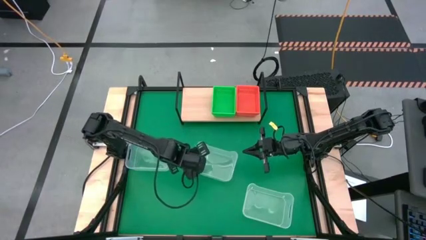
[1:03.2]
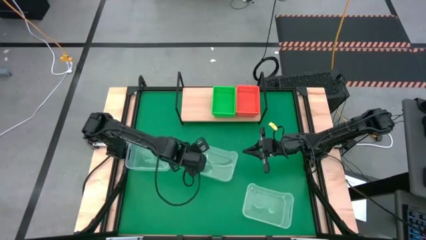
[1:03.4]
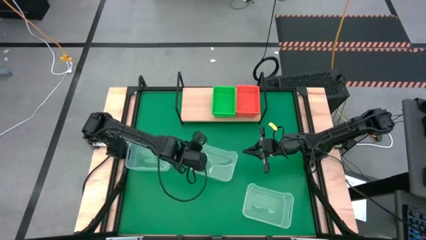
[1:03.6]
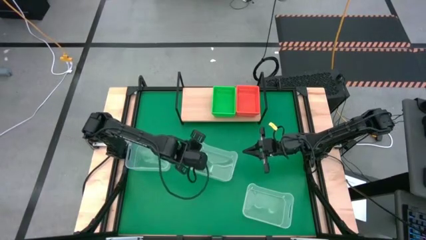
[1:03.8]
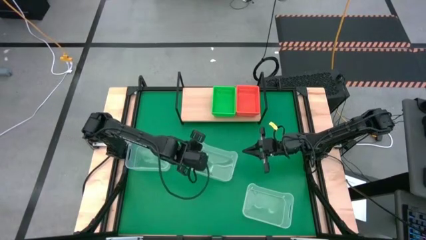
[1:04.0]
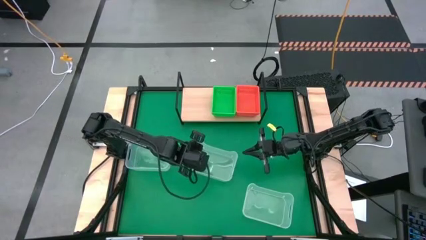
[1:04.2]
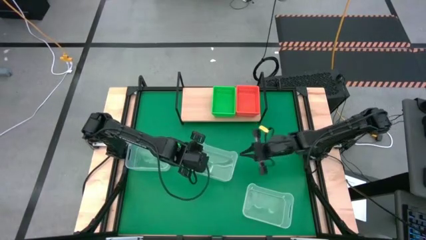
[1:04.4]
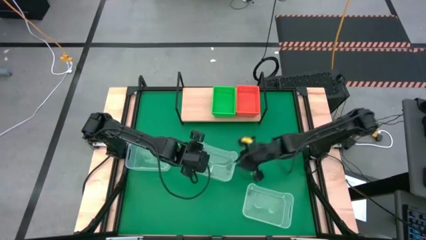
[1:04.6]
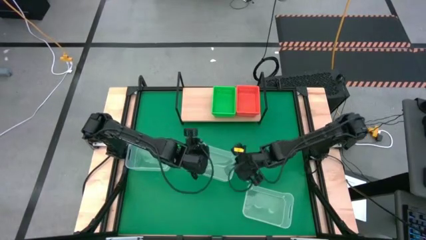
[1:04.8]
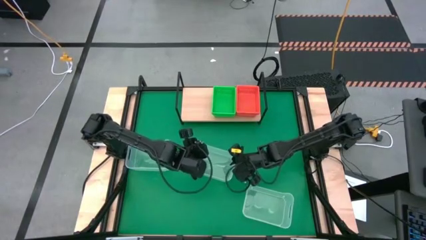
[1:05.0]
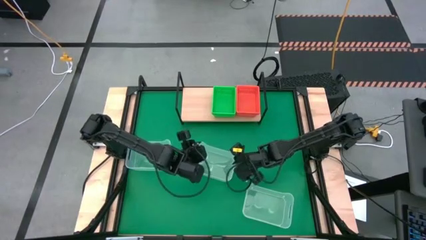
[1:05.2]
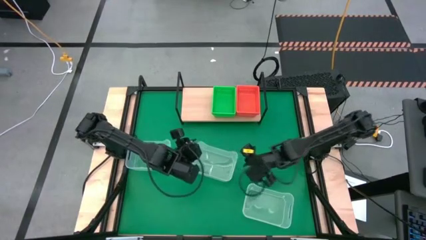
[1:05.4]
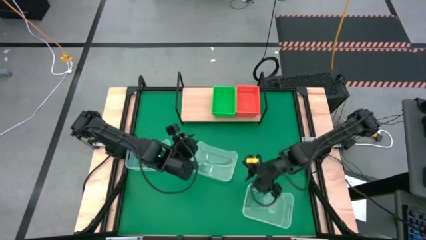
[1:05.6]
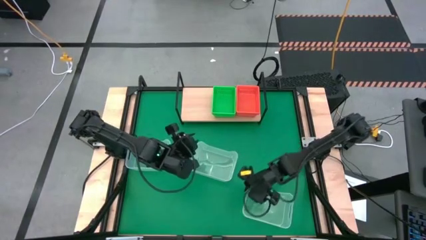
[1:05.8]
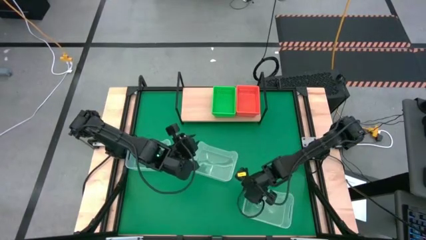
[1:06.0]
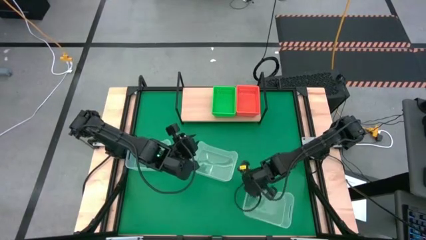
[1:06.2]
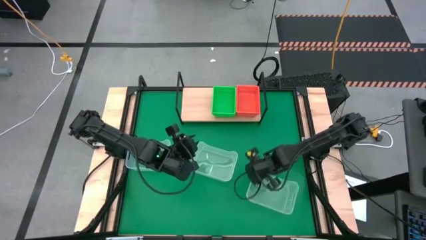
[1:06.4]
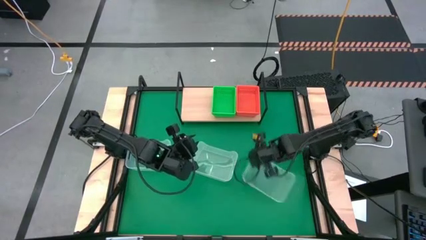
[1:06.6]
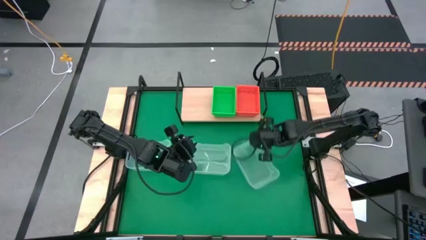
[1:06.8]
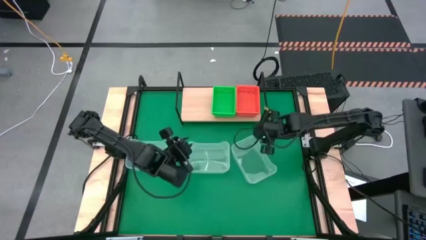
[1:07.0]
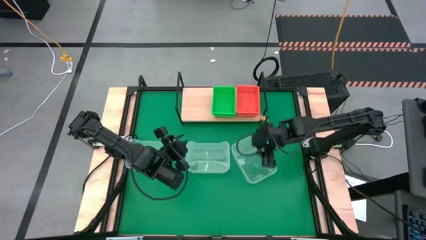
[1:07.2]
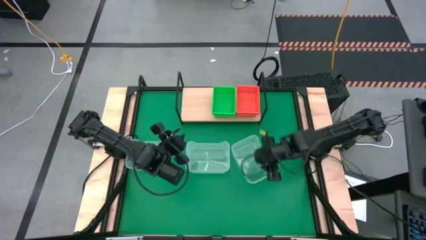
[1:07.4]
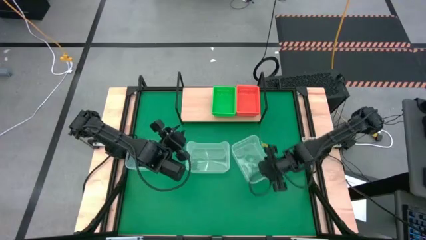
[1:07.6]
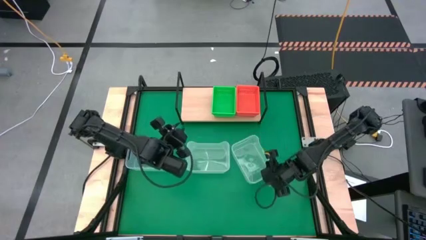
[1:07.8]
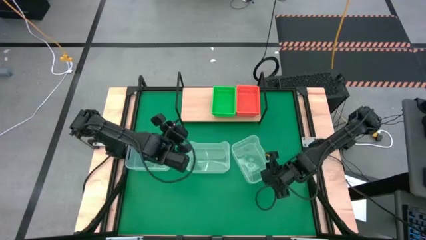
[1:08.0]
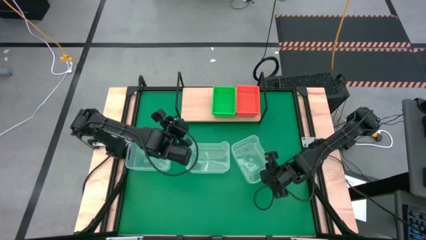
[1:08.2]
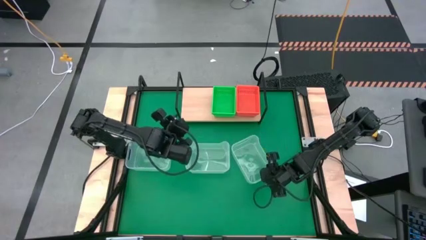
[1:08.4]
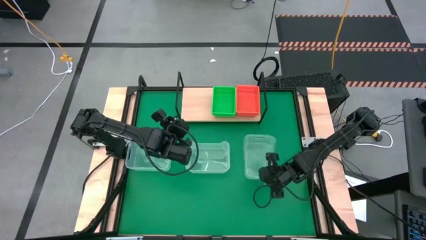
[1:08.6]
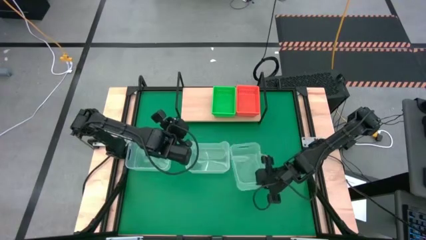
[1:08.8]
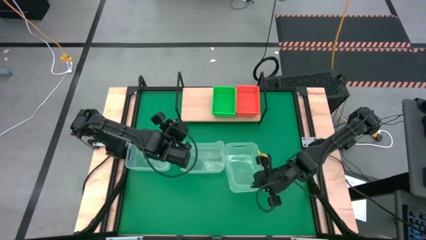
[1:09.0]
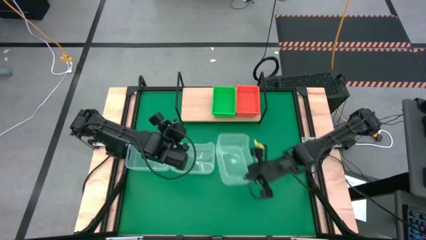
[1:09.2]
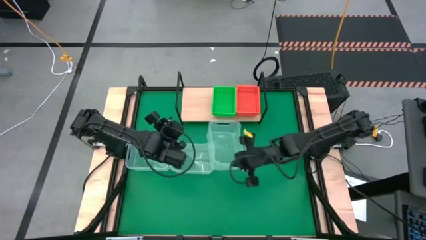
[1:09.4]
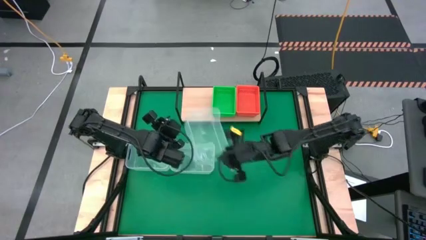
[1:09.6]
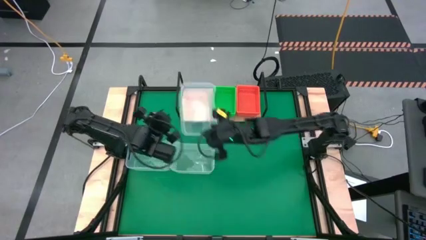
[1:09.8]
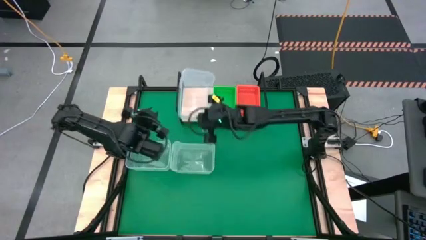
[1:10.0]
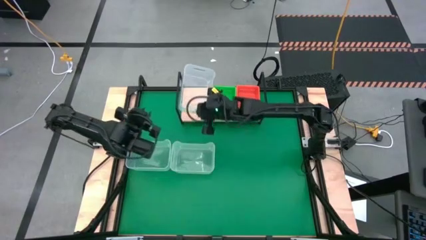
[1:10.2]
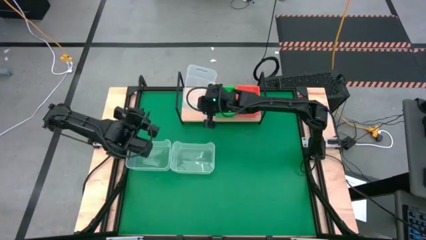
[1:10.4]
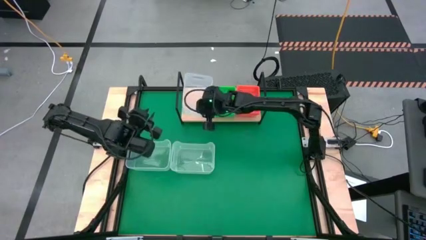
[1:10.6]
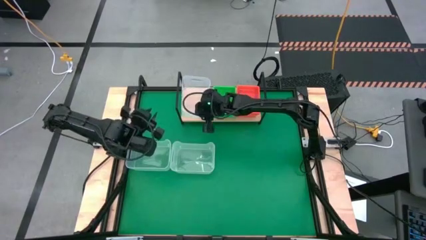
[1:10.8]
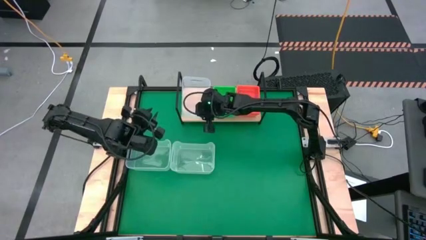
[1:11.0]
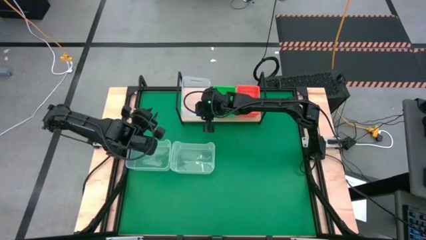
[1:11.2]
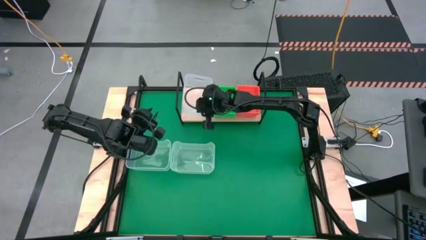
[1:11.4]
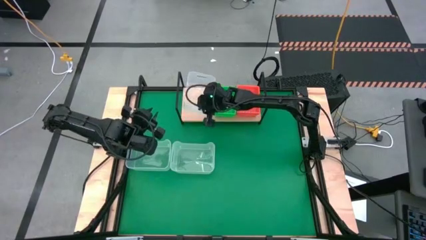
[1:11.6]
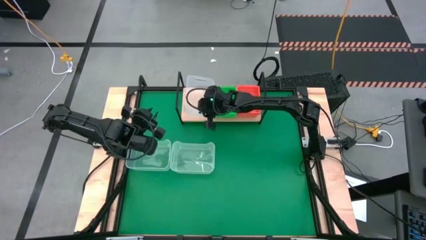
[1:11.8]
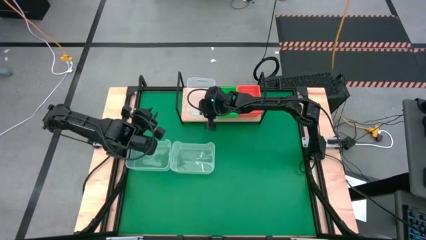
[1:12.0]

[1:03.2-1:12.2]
Task: Stack baskets on shelf by color
Put the bottom right transparent bin on the shelf

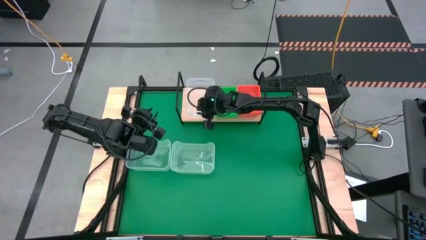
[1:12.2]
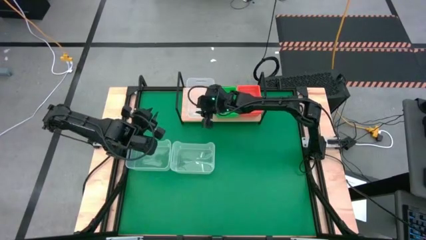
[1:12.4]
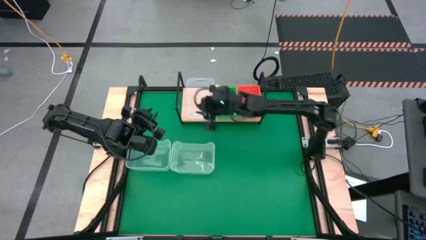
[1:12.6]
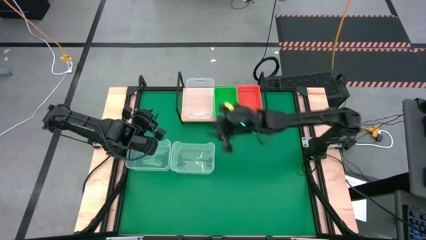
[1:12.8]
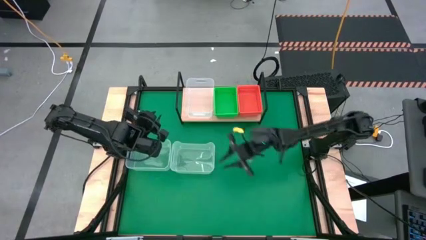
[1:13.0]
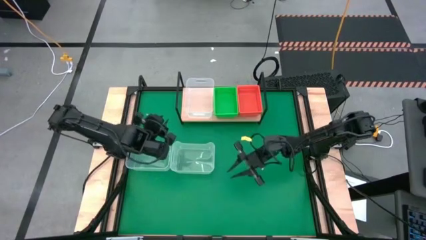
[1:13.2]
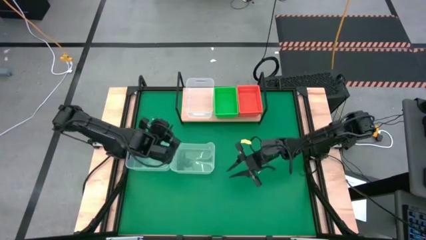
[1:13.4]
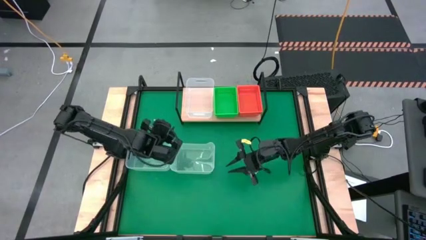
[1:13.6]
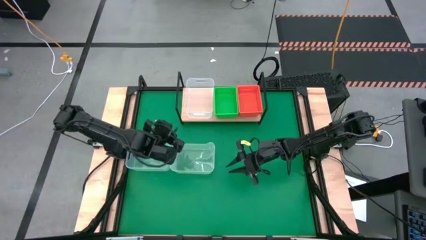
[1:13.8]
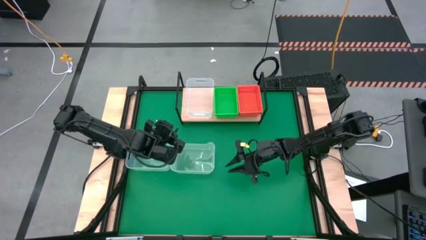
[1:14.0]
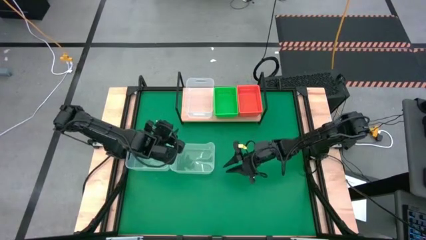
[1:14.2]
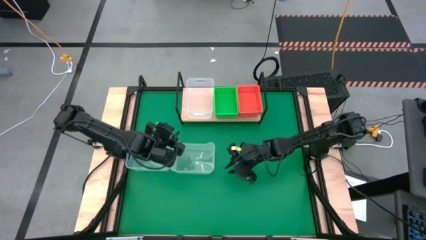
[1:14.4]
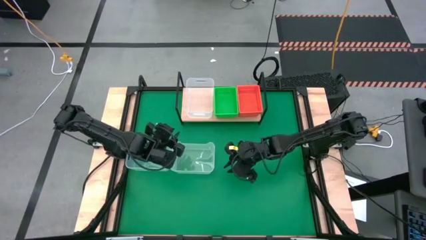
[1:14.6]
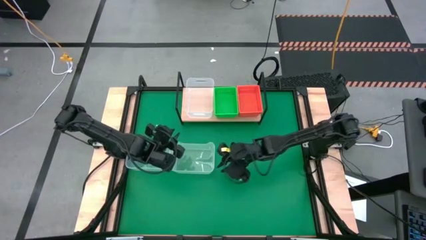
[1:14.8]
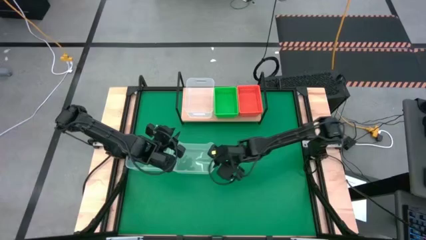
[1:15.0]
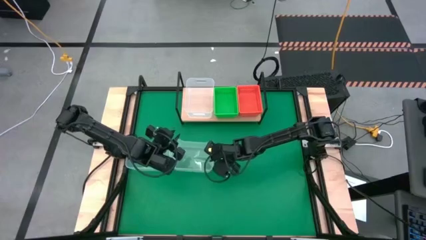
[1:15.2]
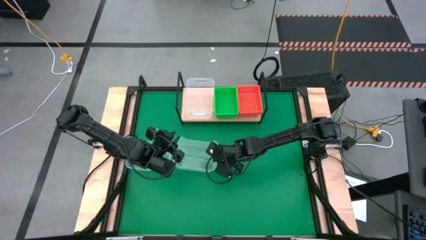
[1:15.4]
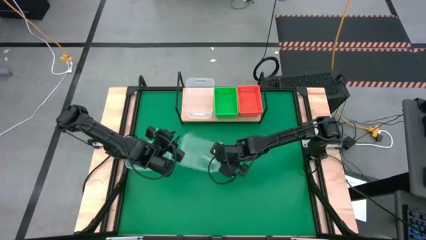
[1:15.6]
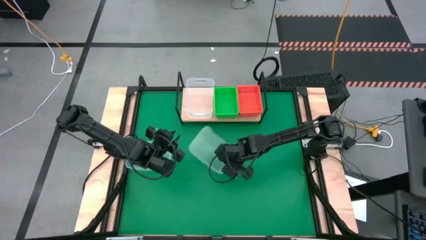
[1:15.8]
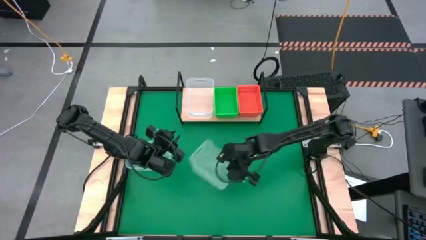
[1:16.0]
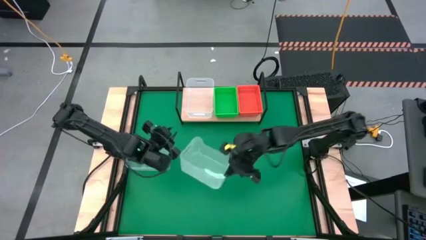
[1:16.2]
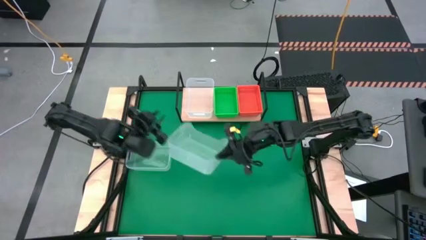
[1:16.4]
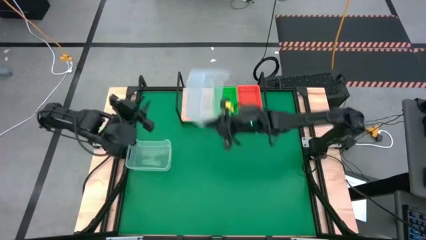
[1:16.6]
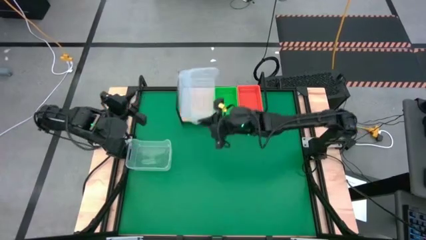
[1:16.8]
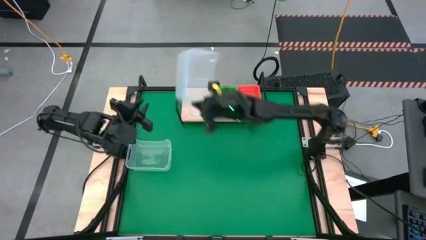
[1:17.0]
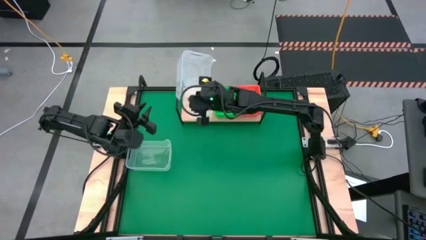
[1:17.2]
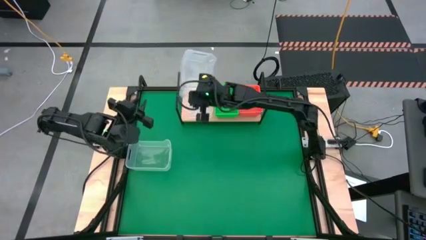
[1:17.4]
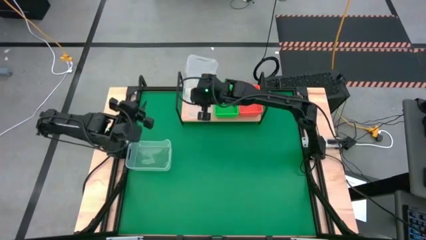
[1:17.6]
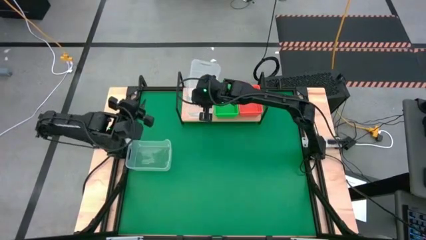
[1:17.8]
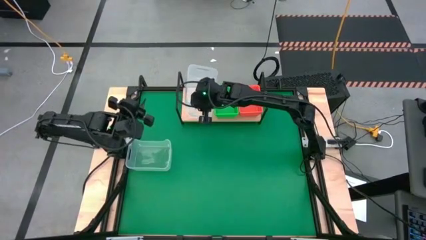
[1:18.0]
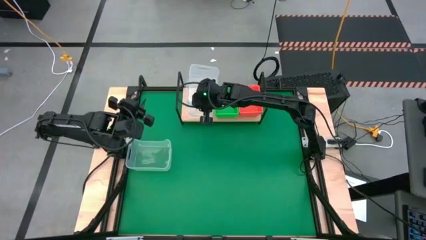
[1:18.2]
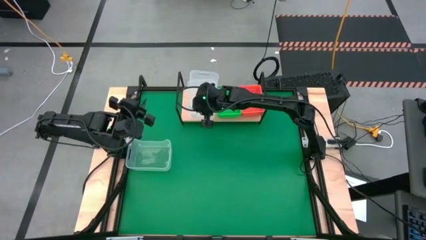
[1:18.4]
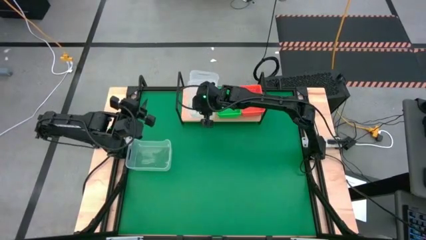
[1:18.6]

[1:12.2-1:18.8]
Stack the right transparent bin on top of the other transparent bin on the shelf

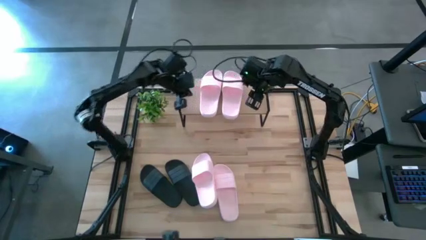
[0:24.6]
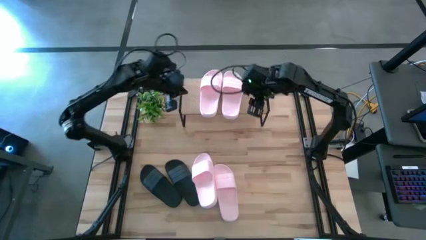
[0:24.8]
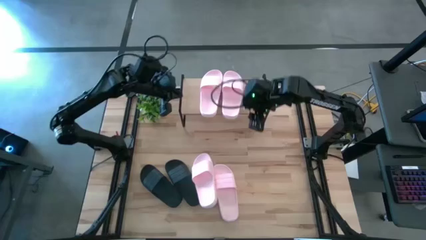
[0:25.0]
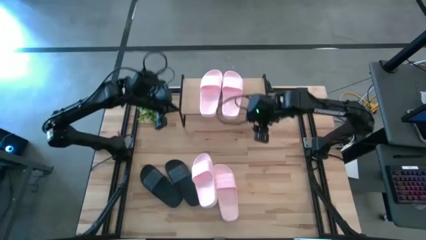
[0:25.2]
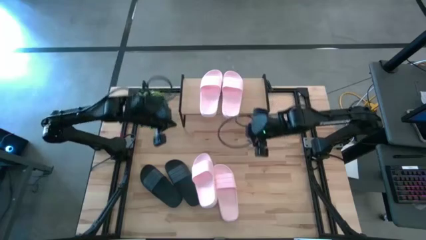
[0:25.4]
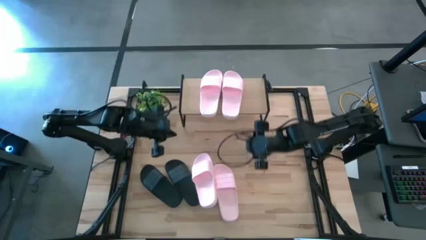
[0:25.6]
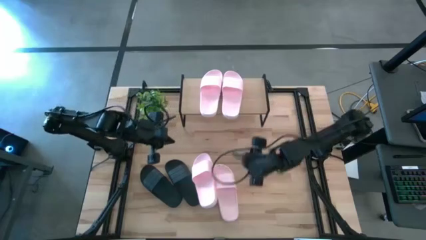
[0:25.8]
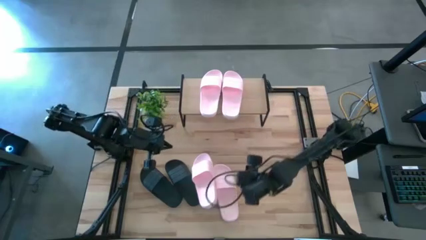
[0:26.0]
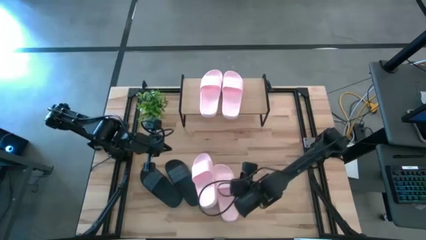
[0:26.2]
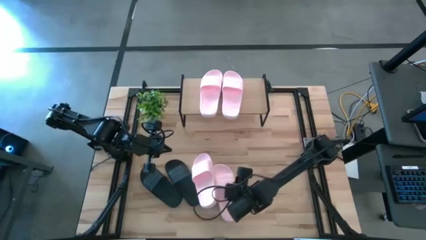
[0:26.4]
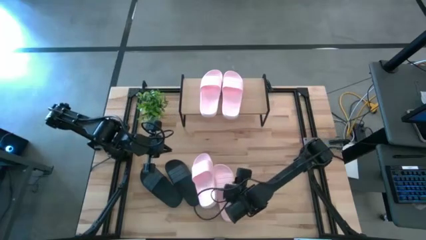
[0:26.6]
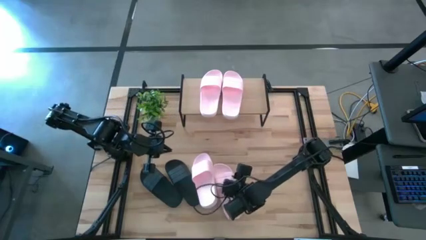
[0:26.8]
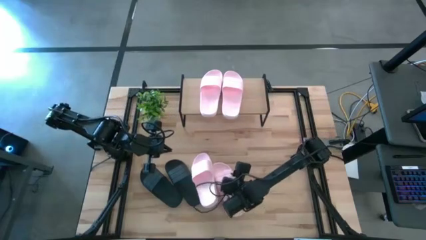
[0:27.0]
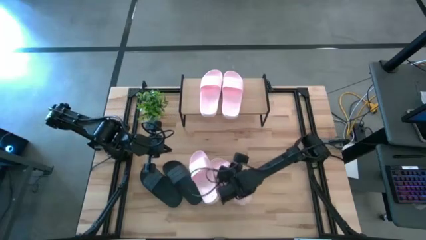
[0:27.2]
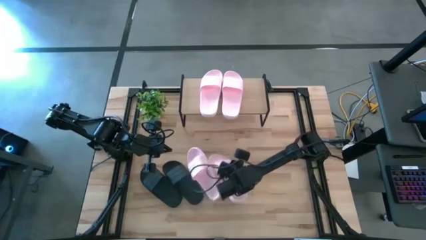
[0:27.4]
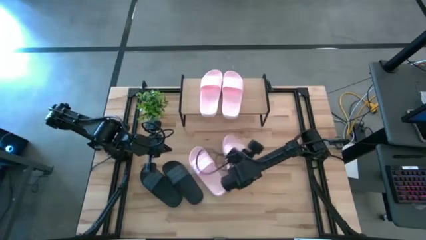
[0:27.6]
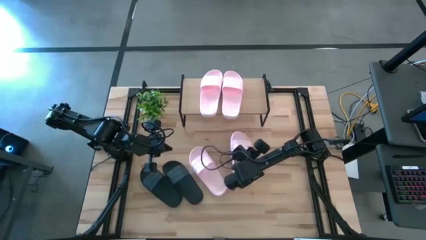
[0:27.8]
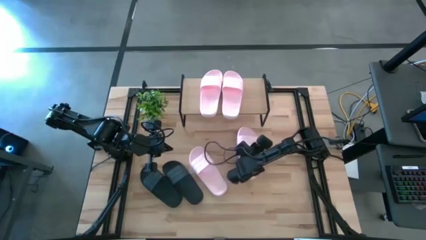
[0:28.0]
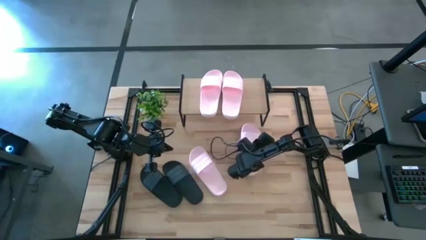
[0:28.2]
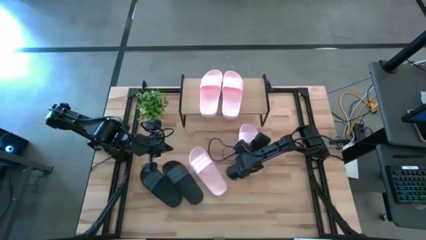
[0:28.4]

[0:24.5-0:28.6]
Task: Pick and place slides into the shelf
Move the right pink slide to the middle right side of the table
